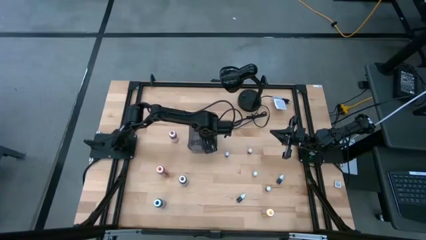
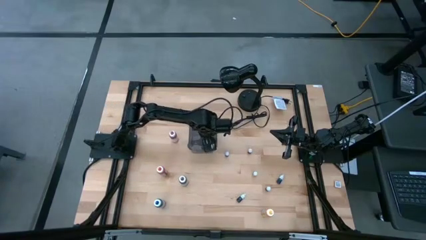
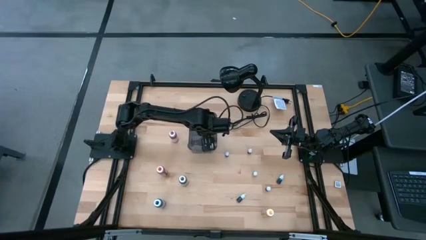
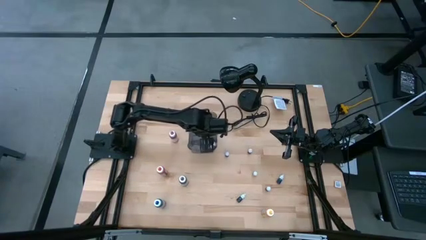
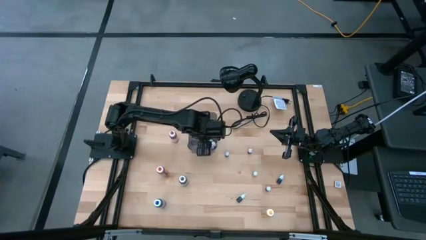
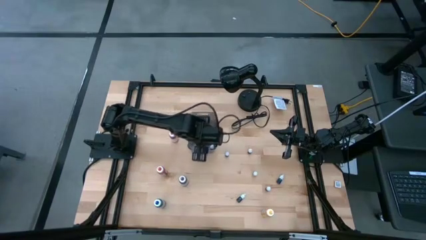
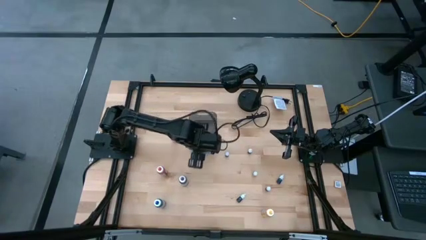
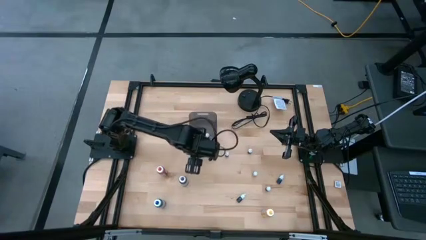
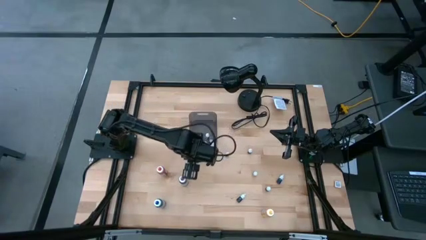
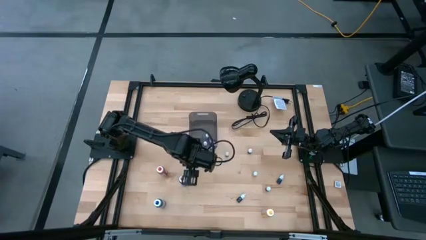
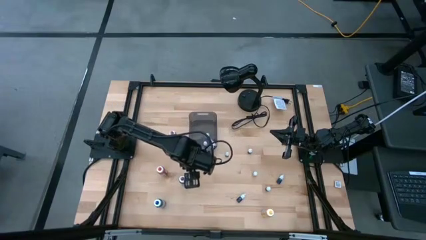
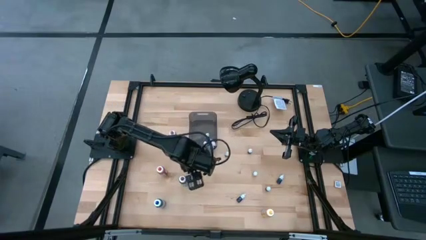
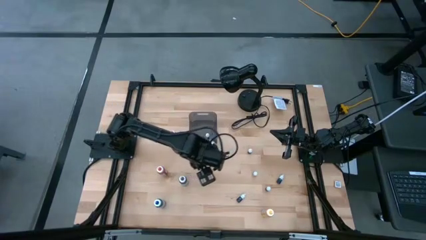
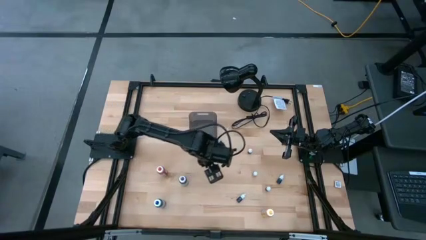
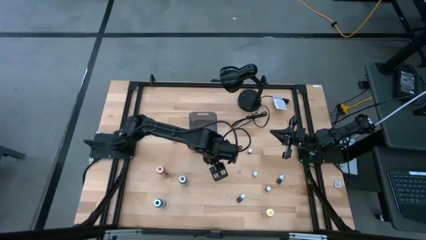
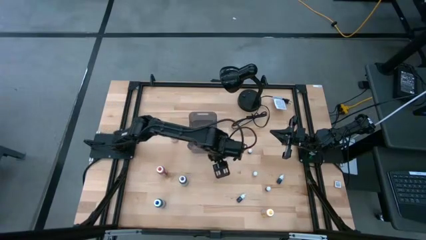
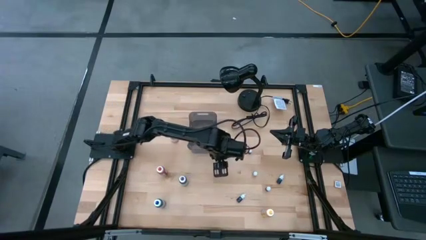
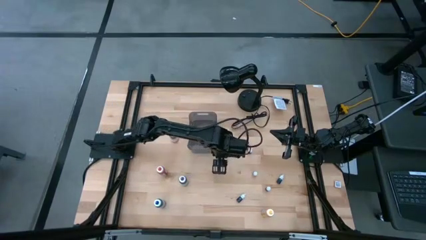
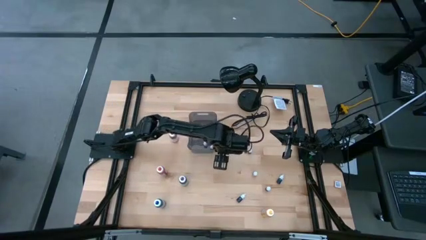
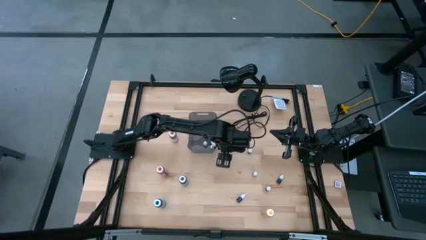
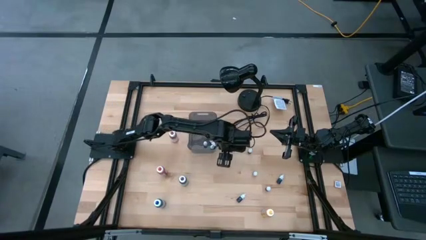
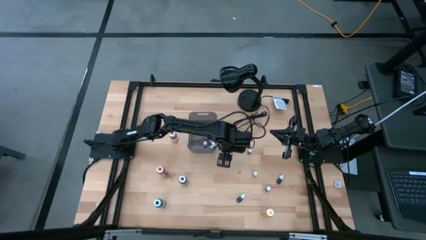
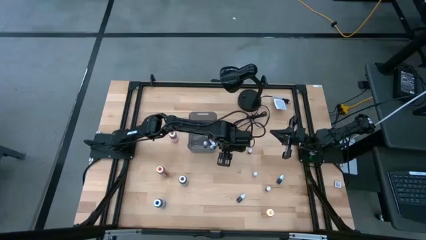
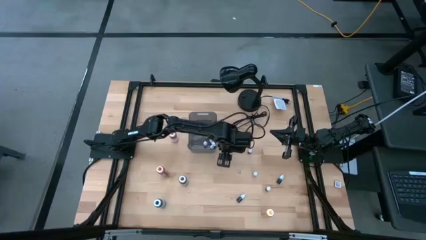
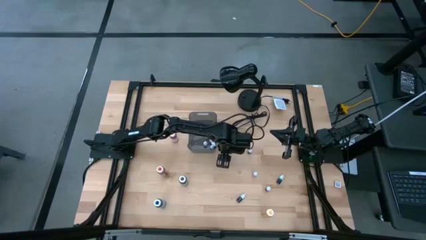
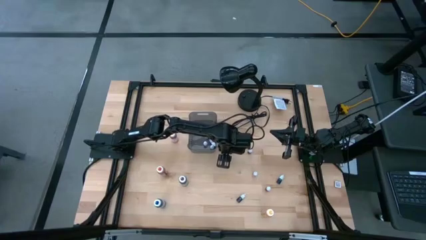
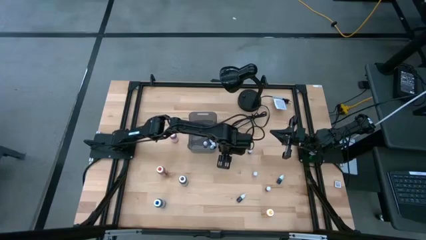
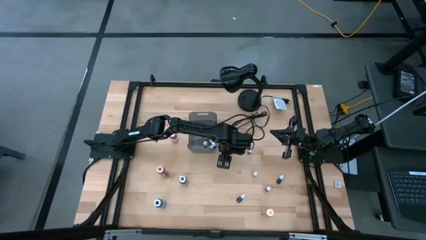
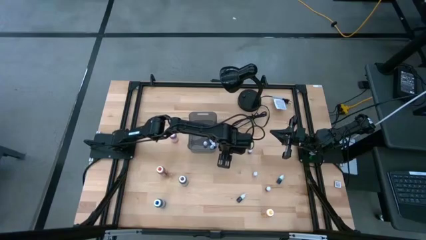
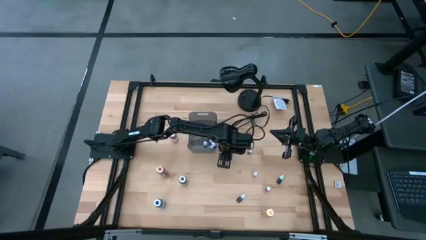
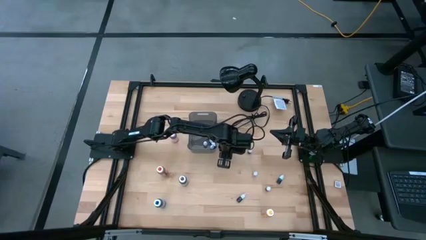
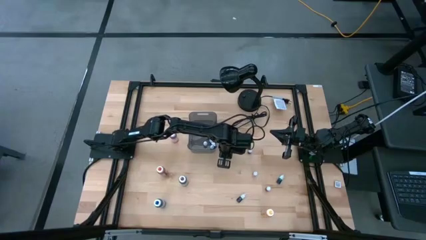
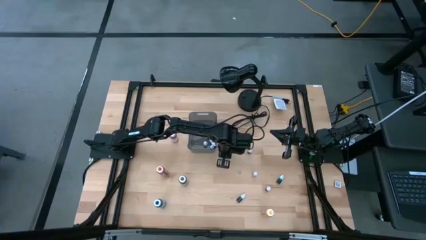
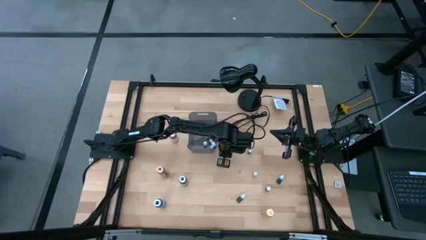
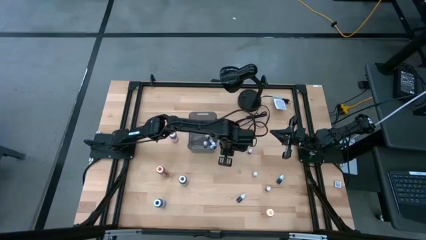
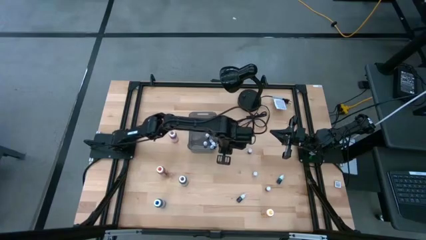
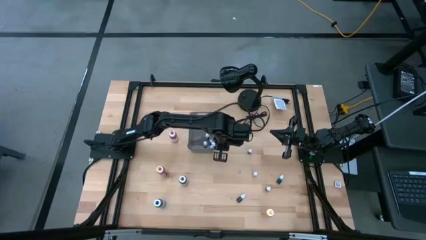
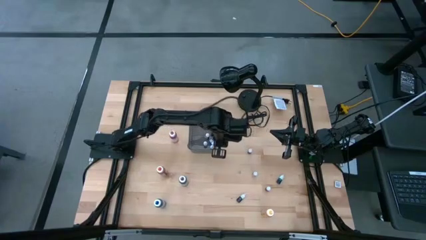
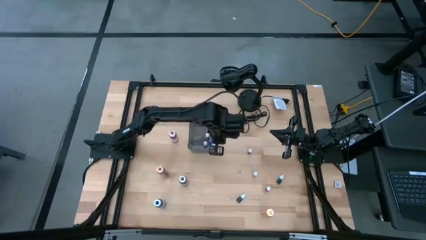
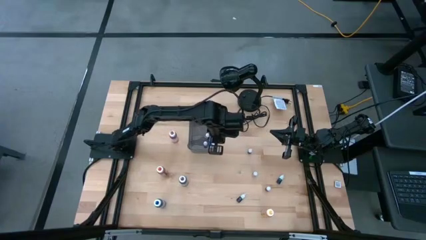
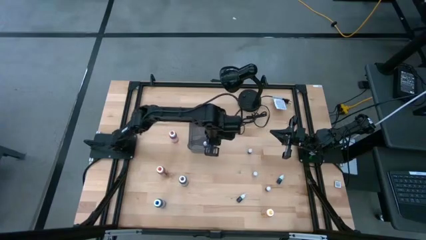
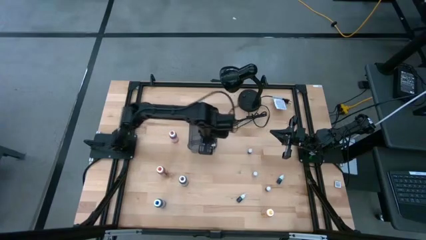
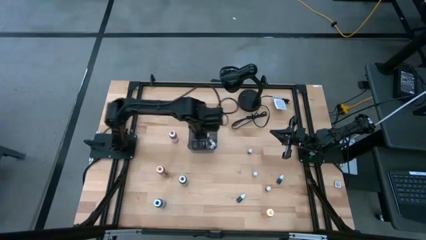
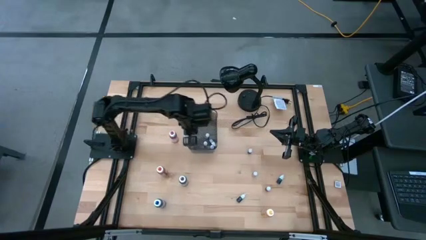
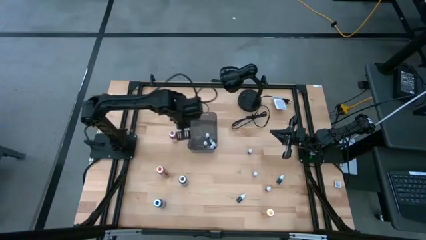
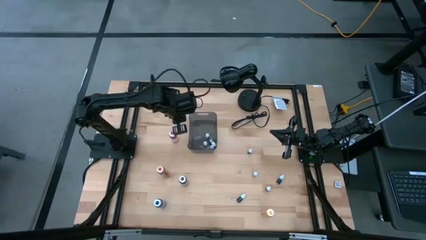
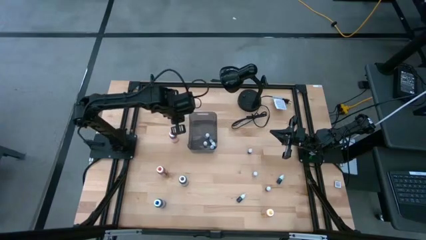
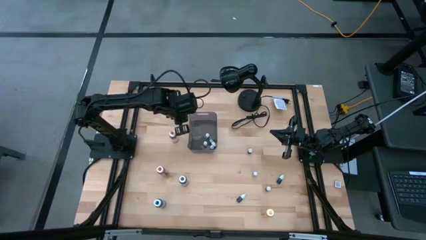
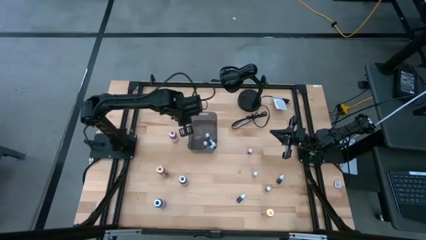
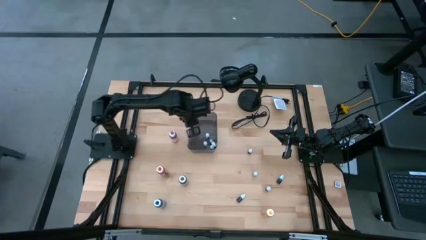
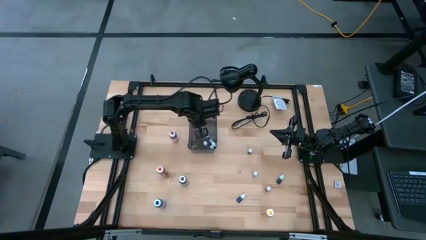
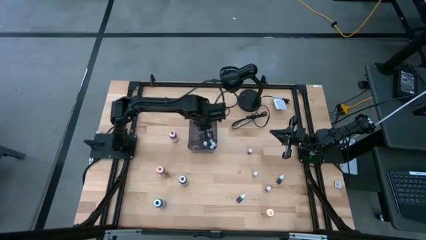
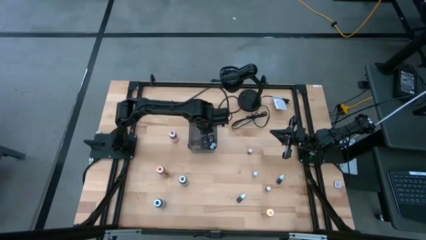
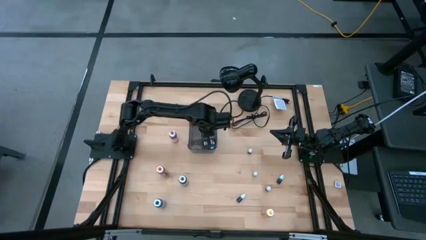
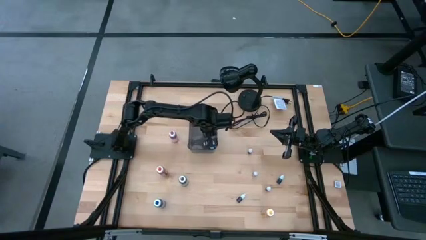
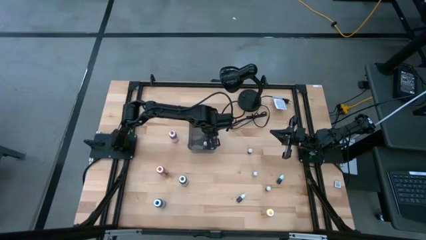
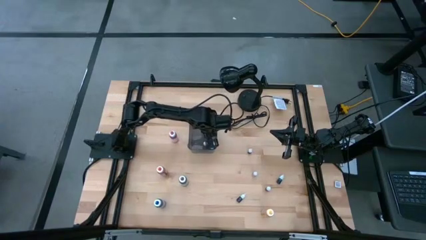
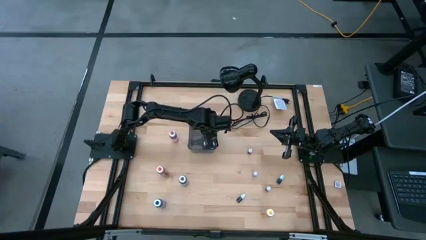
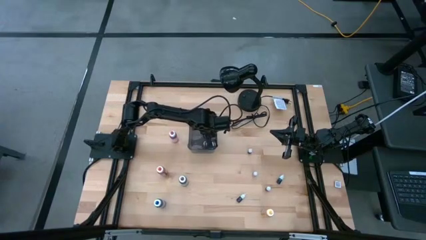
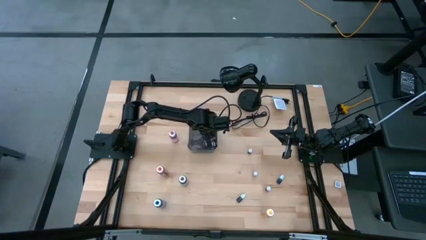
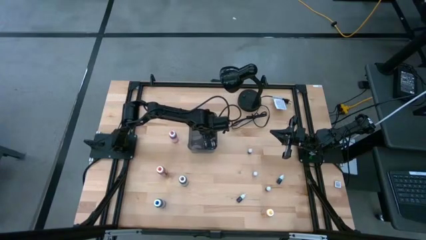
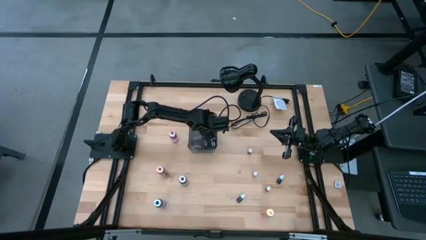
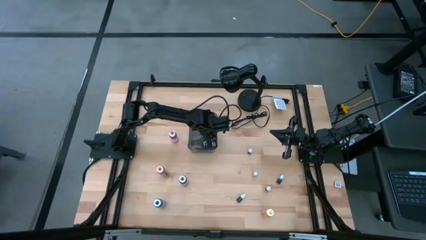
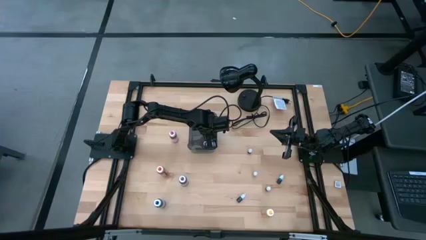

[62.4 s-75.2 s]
Task: Pick & Place food coloring
Put the top small blue food coloring bottle into the gray transparent bin
